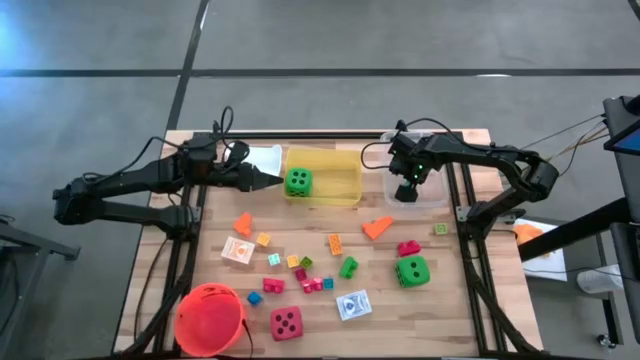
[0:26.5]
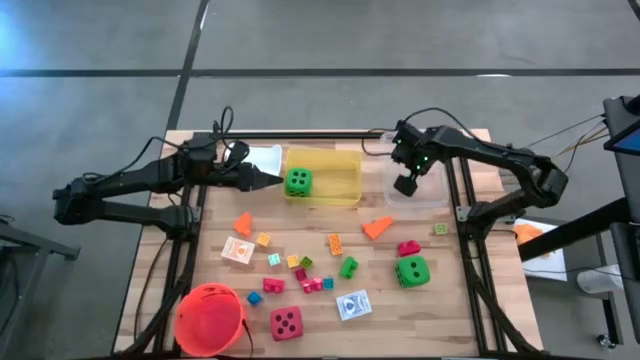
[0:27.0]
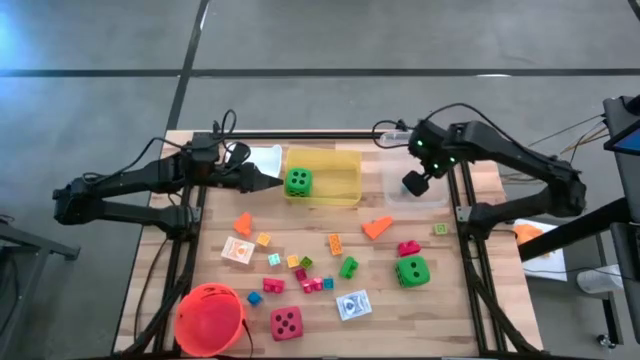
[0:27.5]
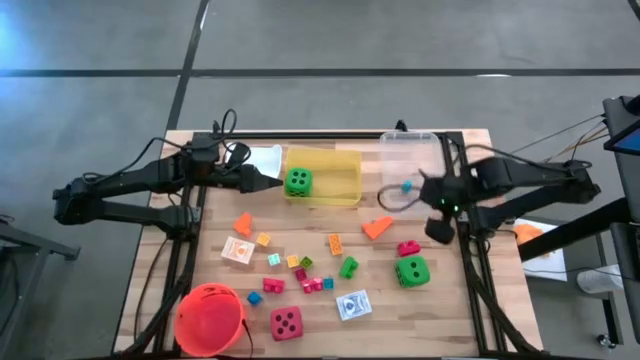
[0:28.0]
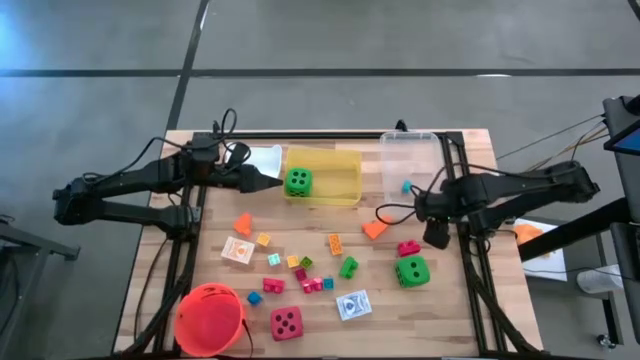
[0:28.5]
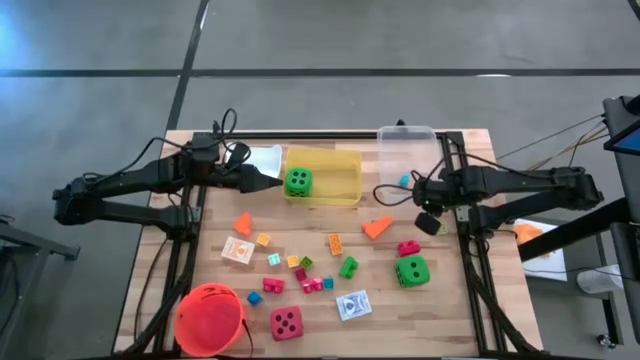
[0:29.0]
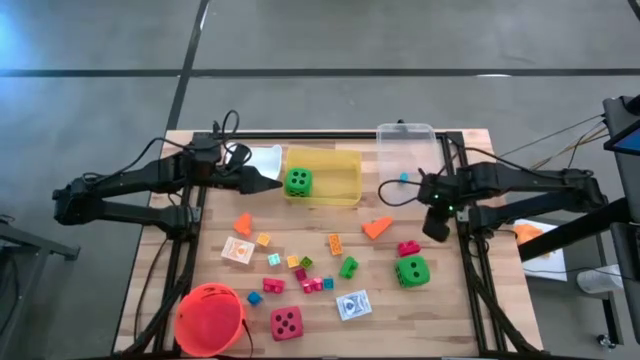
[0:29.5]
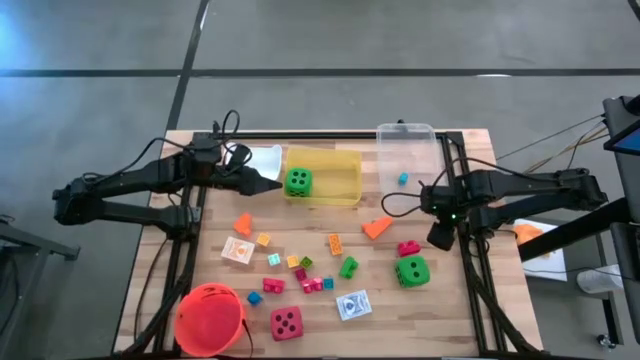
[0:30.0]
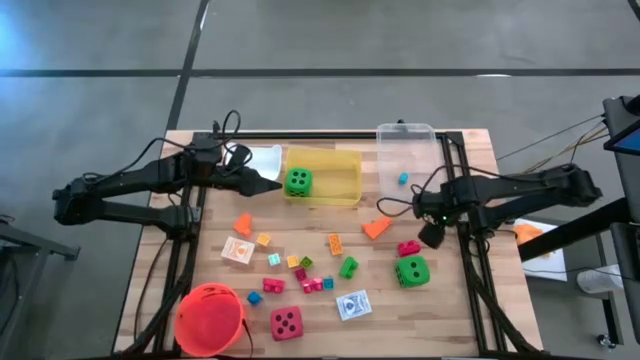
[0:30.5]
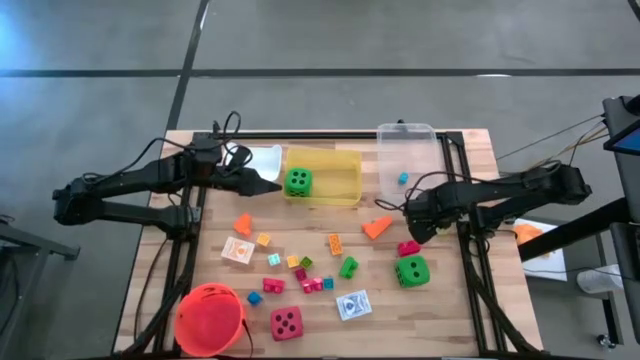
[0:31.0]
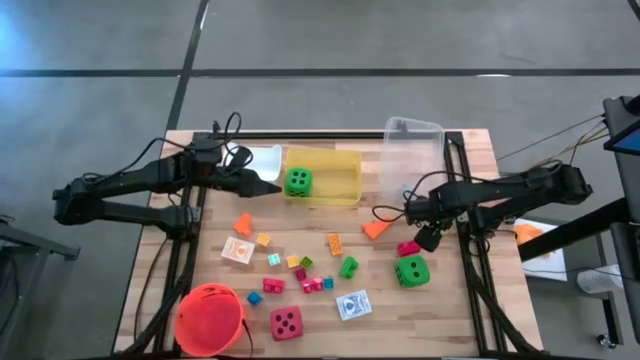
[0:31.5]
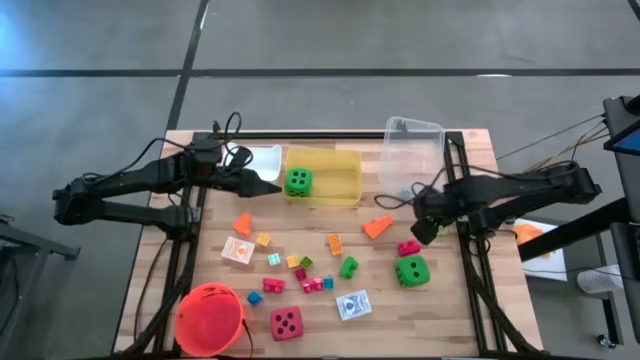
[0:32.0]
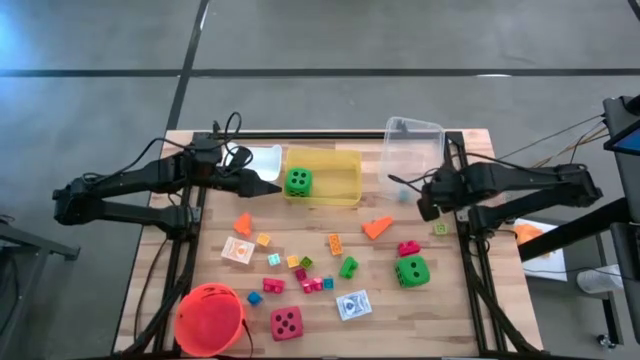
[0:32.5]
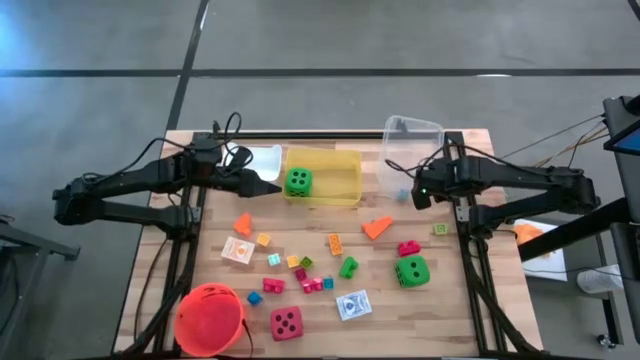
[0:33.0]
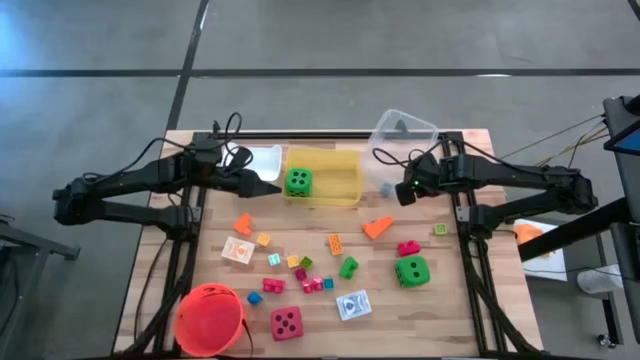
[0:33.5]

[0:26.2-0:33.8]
Task: Pick & Place Toys
Adjust the transparent bin

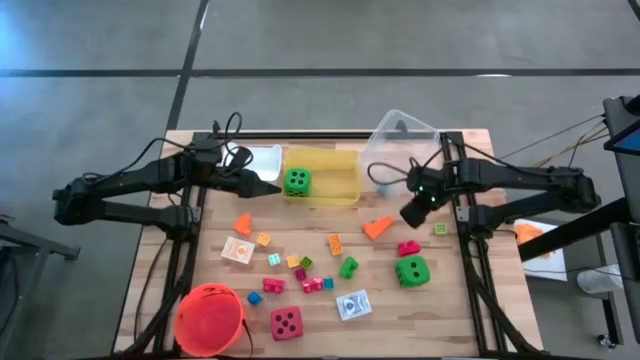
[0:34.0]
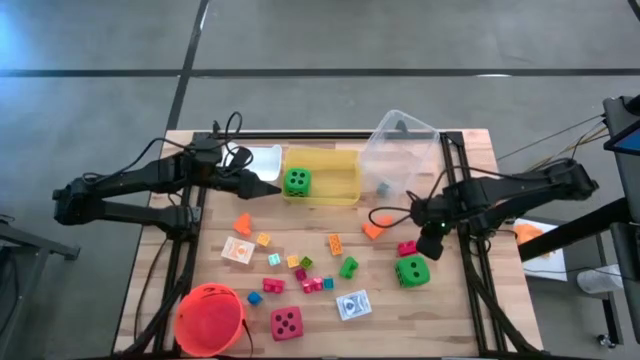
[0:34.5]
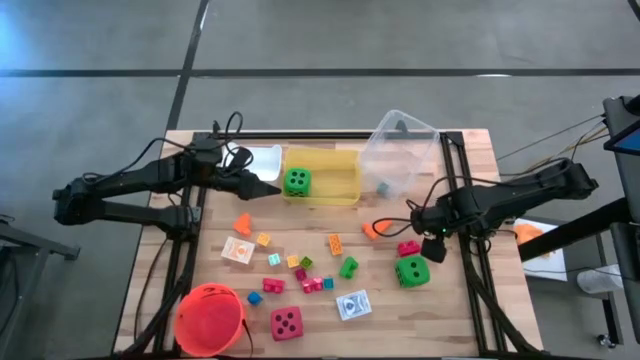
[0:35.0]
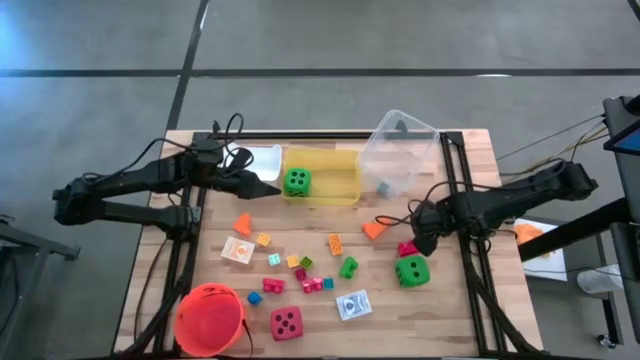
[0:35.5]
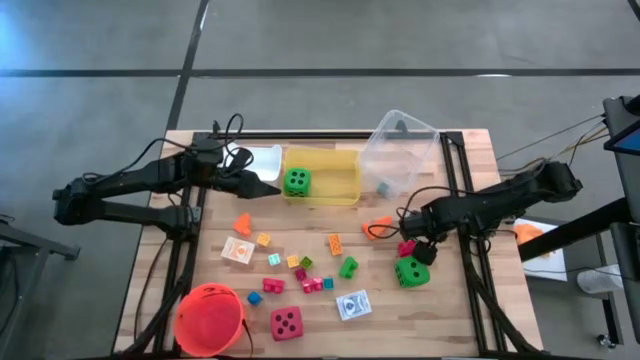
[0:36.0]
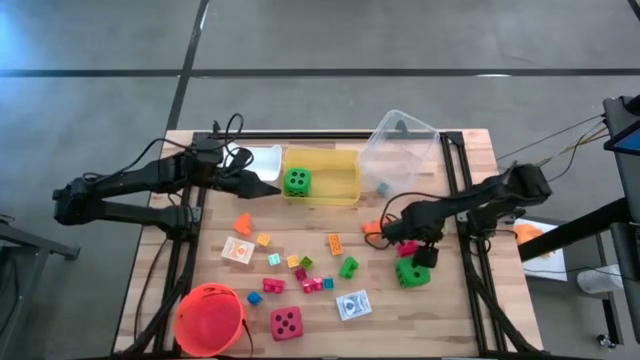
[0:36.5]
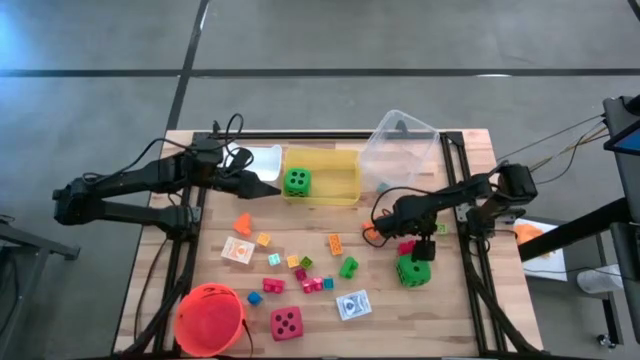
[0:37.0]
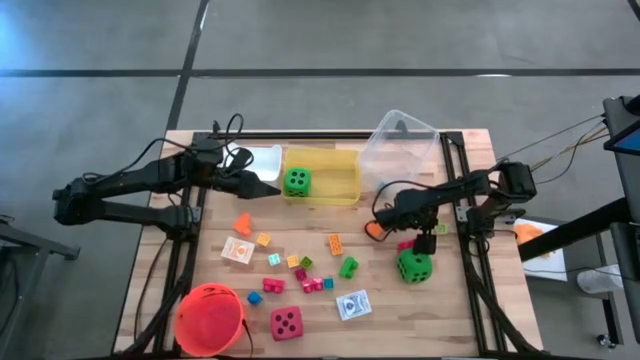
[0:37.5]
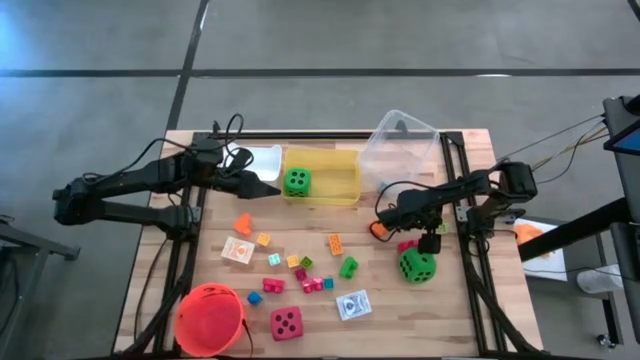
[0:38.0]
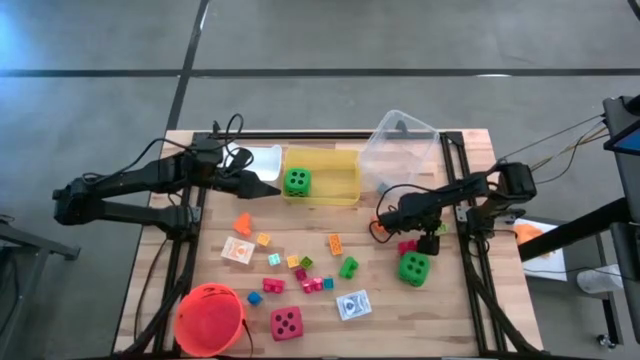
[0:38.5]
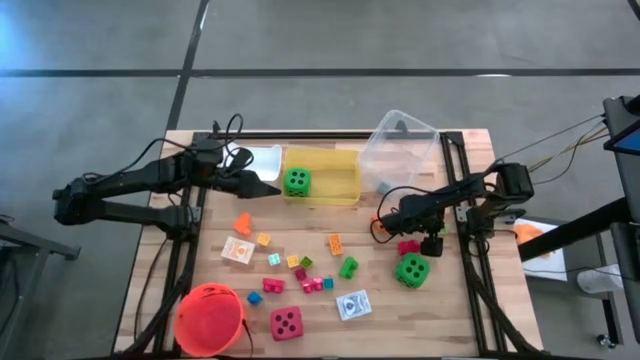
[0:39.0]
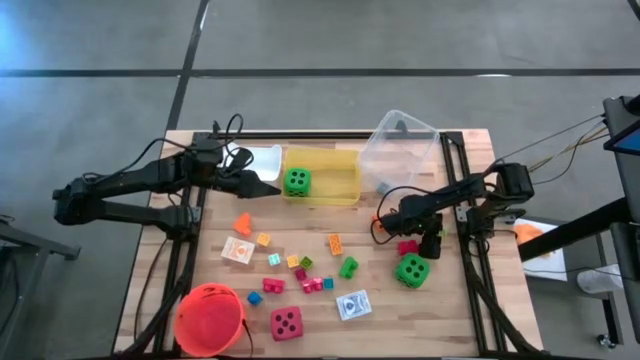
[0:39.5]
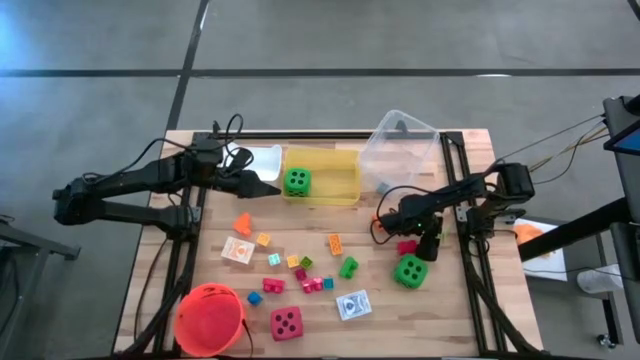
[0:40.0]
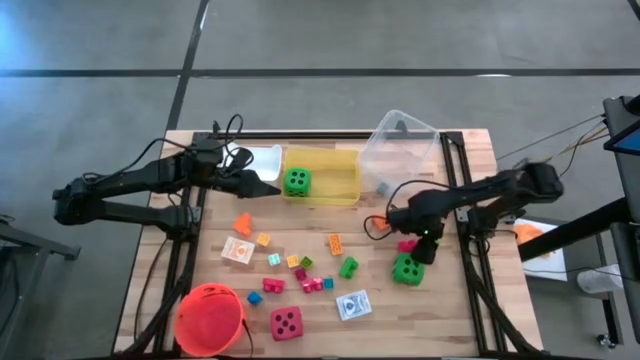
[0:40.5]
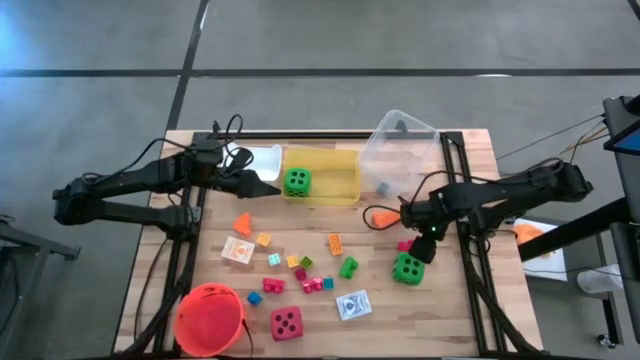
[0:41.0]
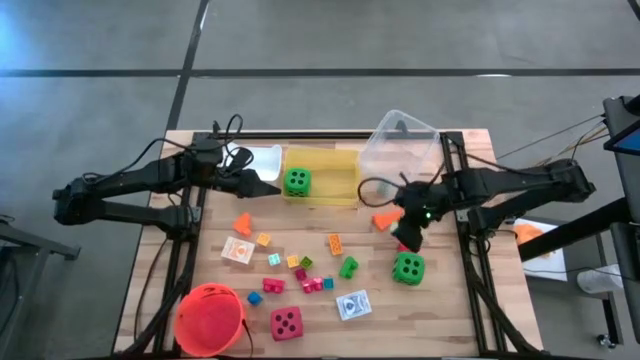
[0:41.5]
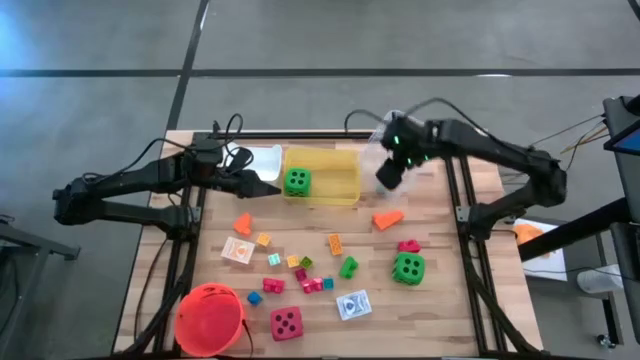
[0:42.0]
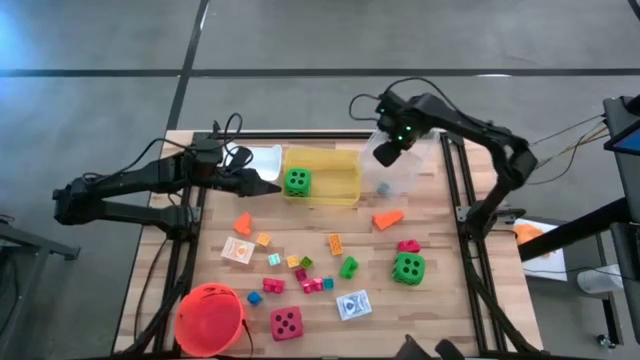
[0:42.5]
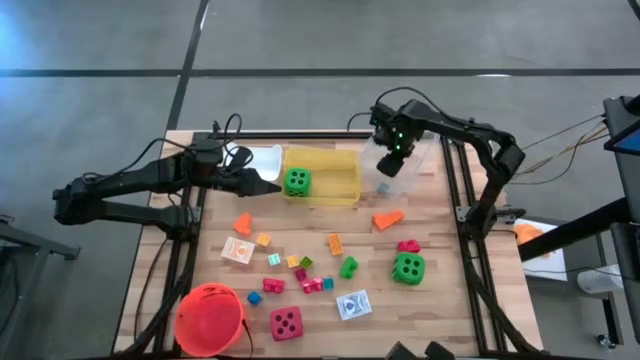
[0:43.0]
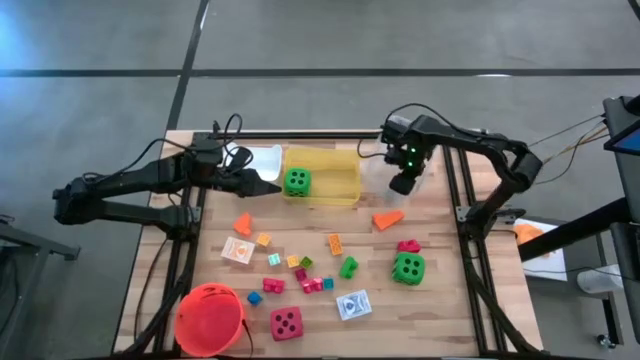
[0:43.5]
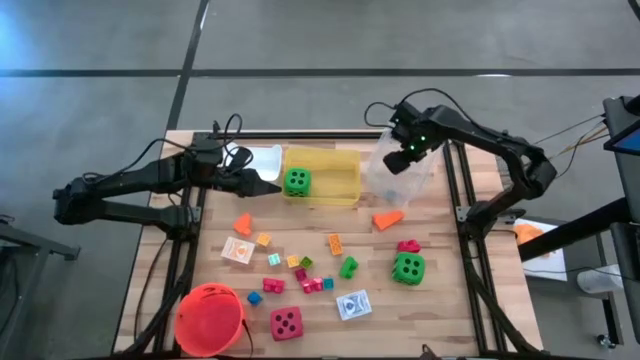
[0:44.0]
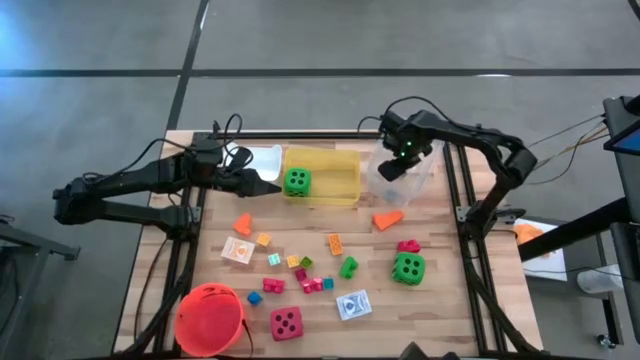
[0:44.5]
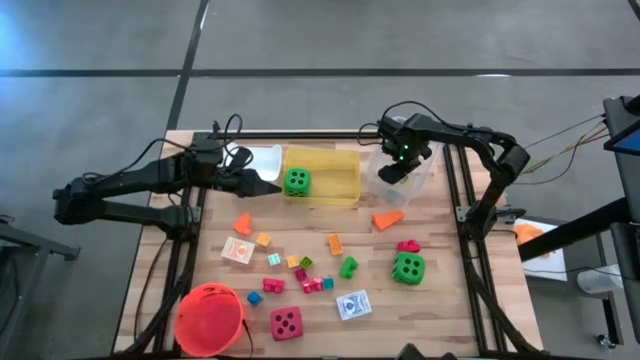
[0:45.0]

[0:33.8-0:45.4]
Put the light green game piece into the transparent bin

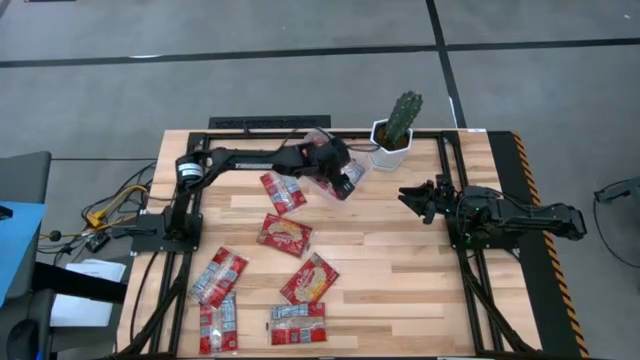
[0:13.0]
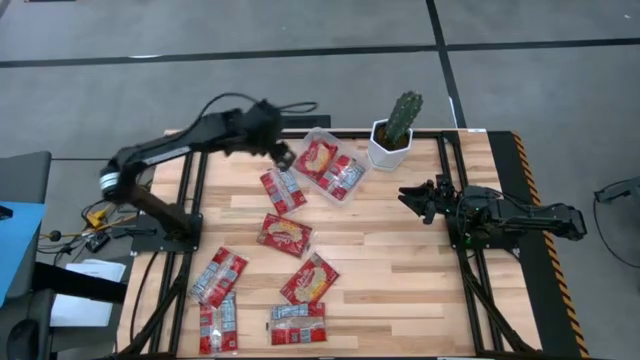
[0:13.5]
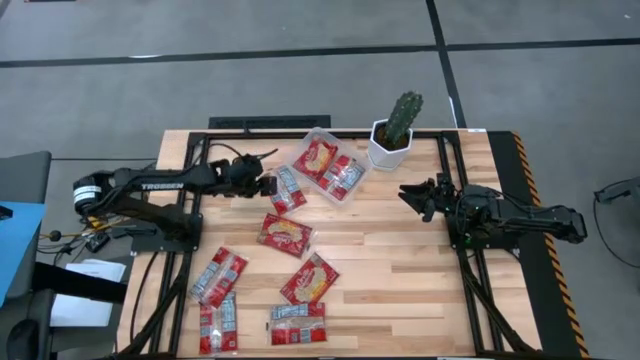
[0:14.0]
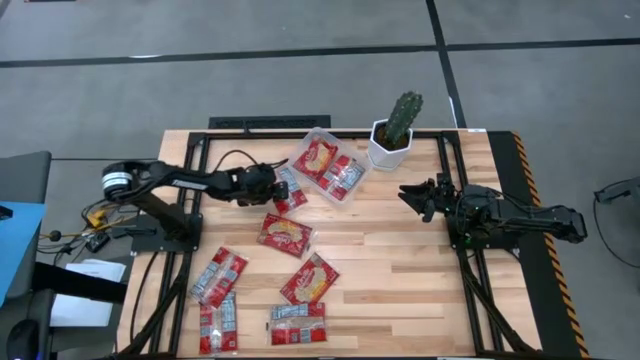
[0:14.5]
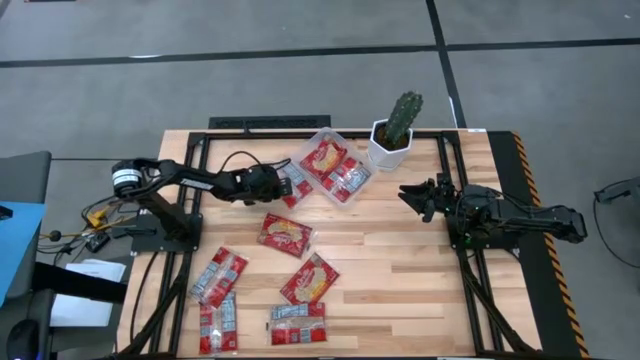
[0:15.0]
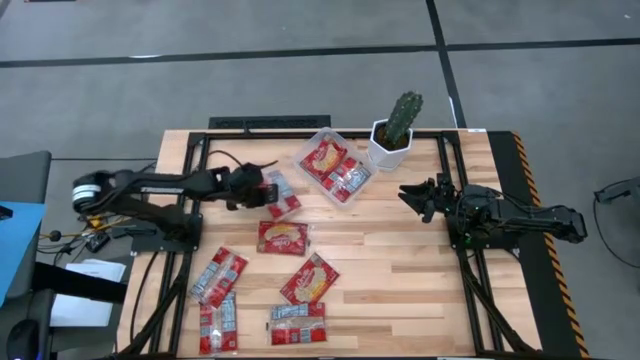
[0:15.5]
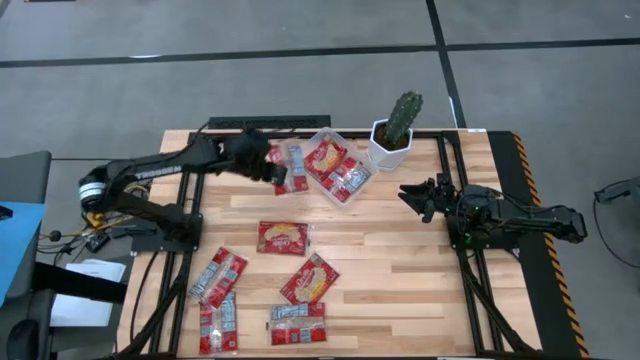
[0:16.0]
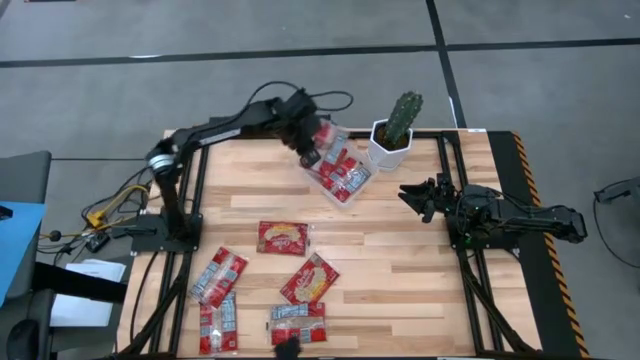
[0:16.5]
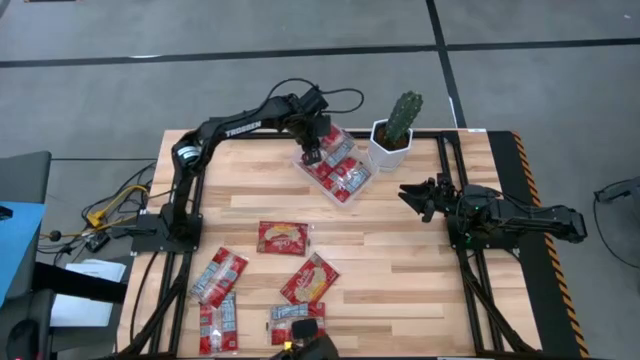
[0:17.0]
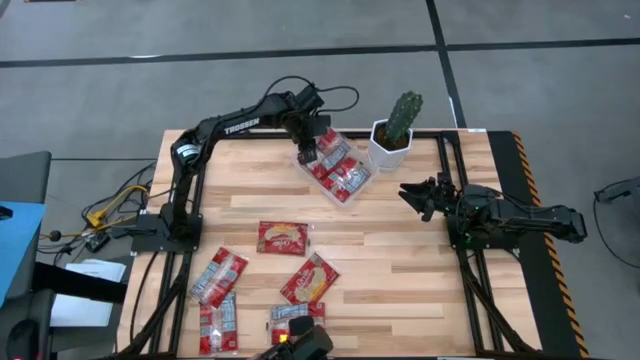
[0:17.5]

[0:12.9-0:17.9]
Task: Sort popcorn bags into baskets
Put the red popcorn bag into the transparent bin
